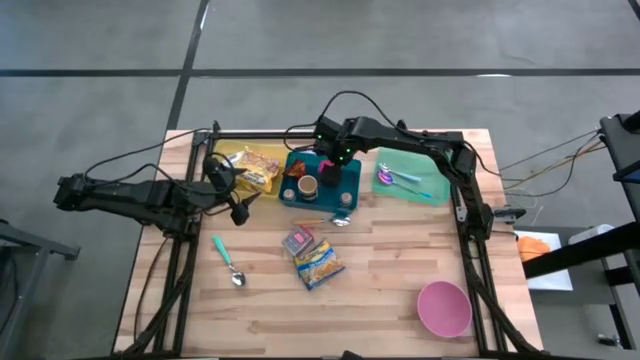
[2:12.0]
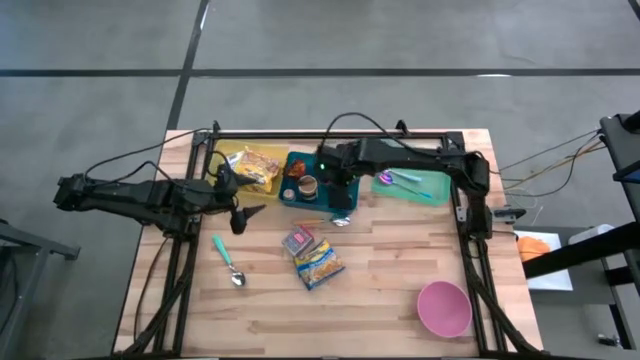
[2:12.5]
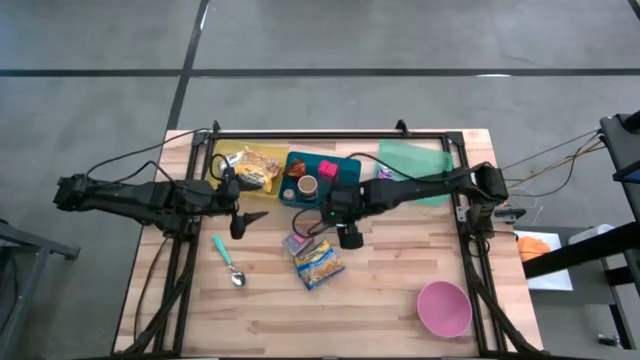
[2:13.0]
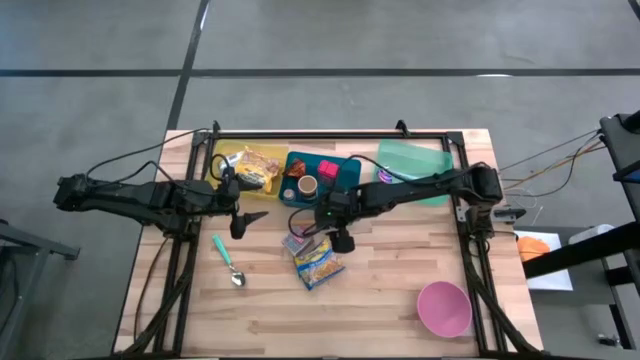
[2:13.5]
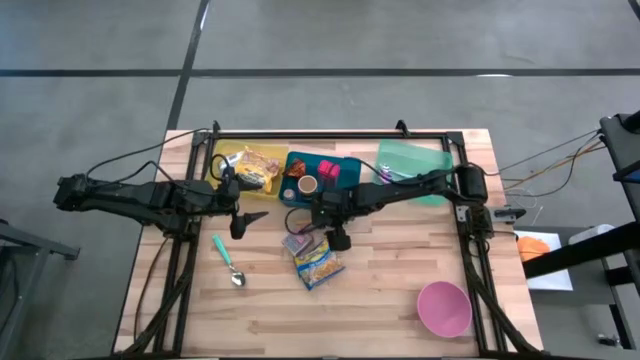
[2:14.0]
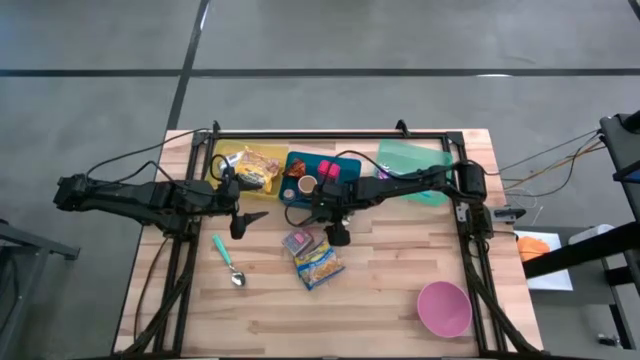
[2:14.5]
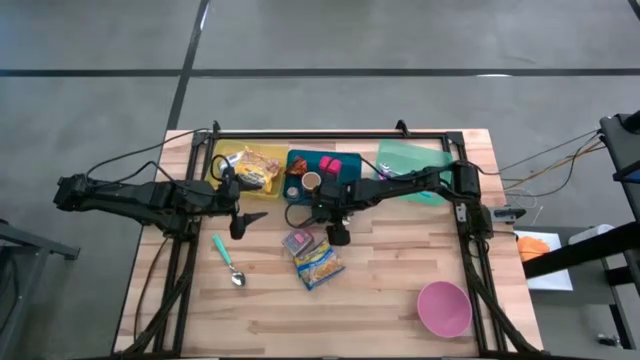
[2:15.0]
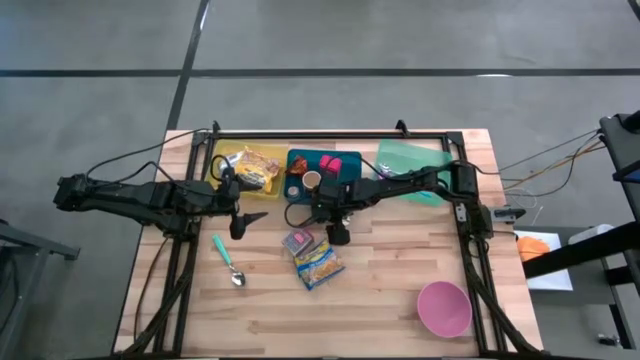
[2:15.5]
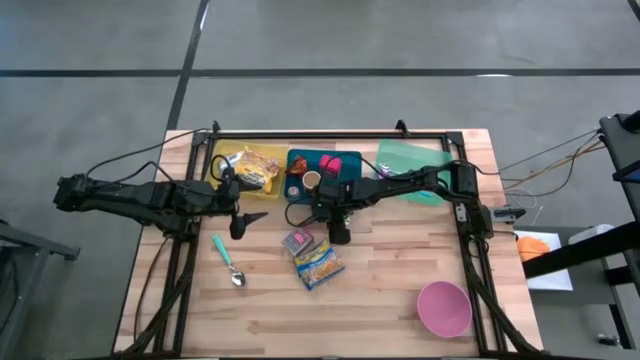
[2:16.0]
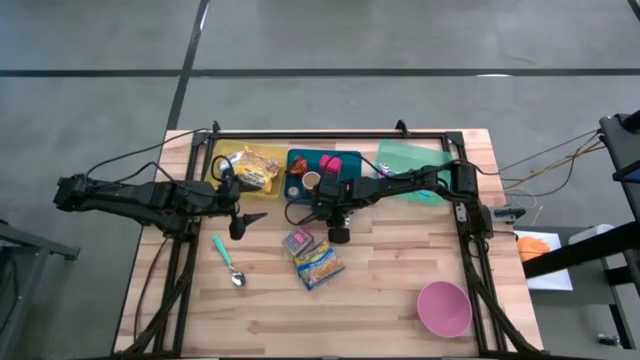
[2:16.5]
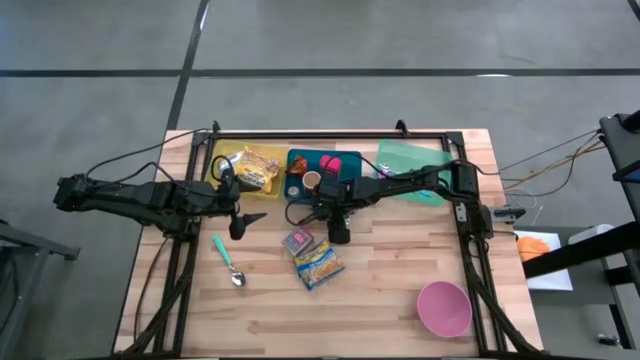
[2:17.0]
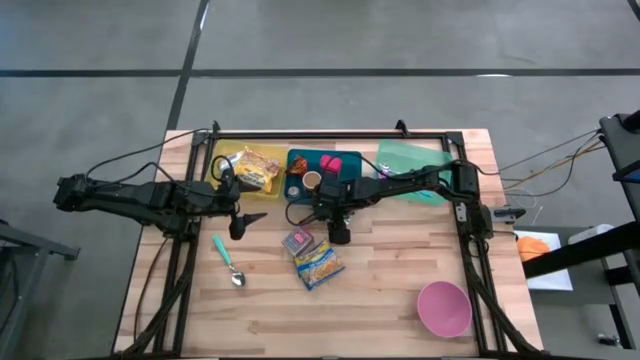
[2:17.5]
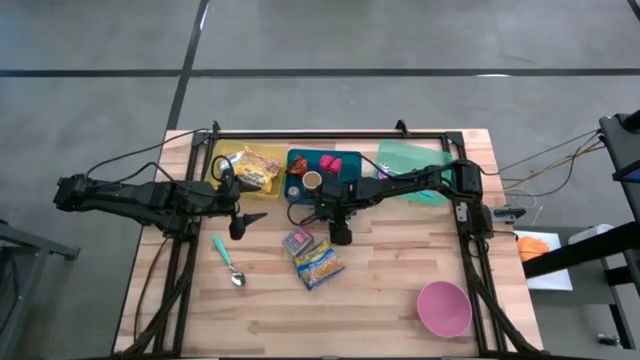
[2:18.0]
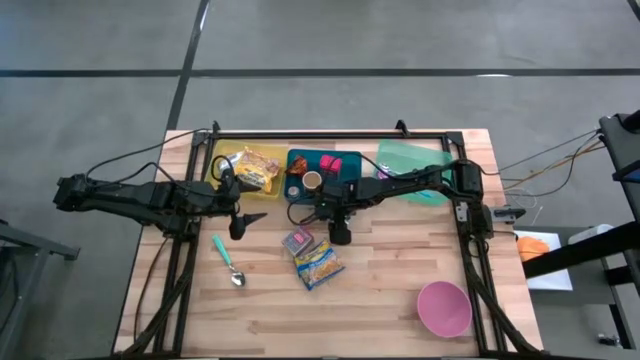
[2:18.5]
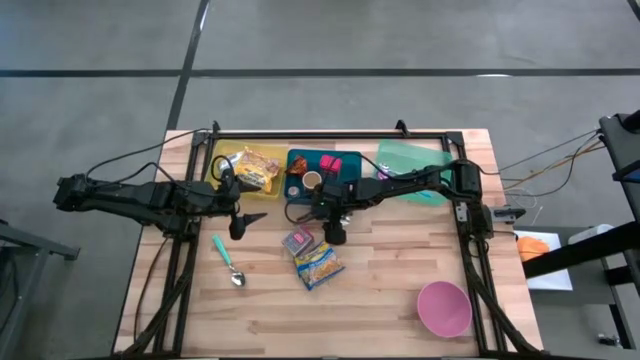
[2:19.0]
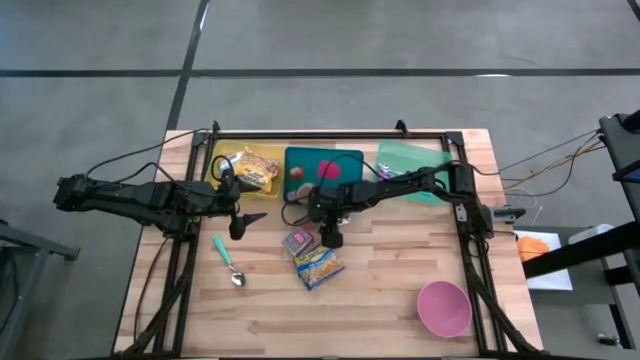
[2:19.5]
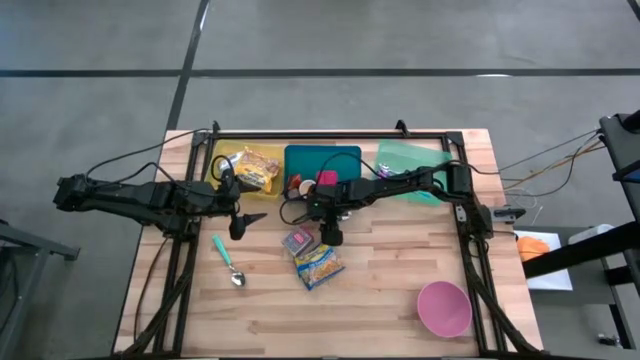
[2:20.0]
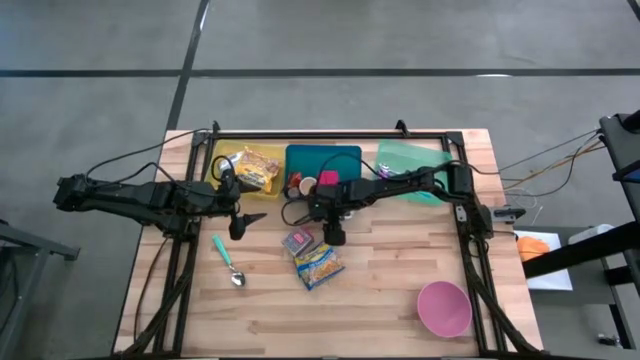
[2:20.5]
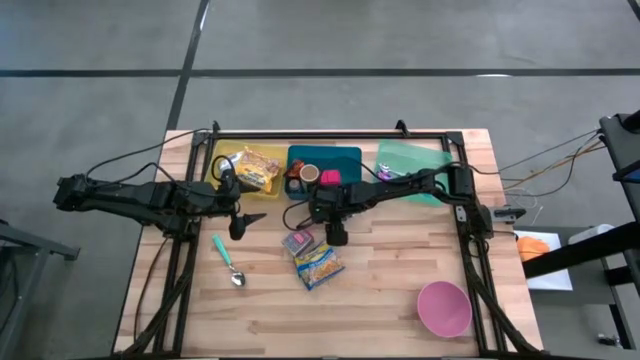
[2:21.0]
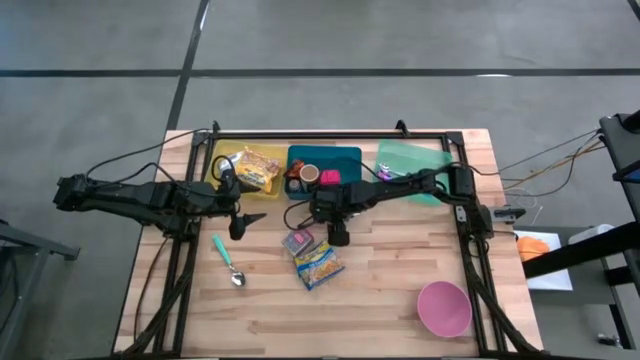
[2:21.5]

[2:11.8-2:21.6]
Put the orange spoon into the green bin

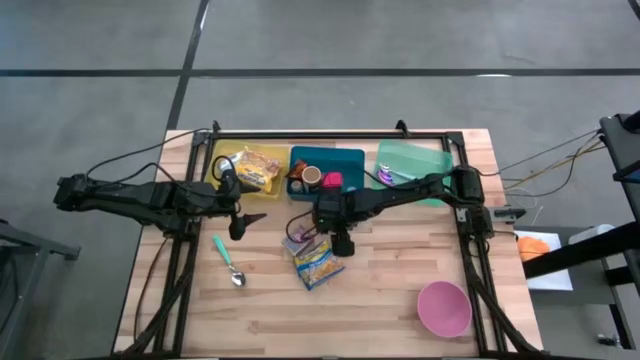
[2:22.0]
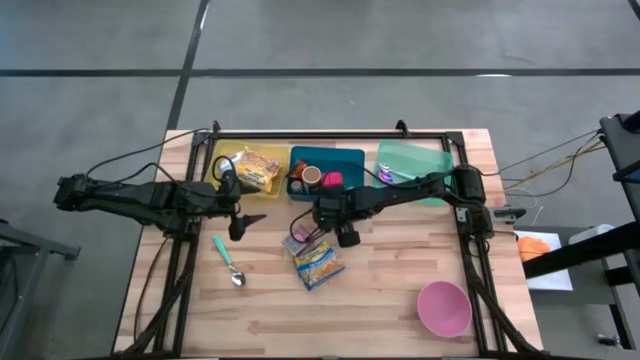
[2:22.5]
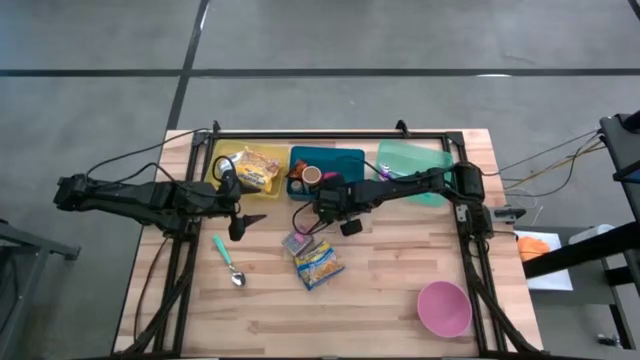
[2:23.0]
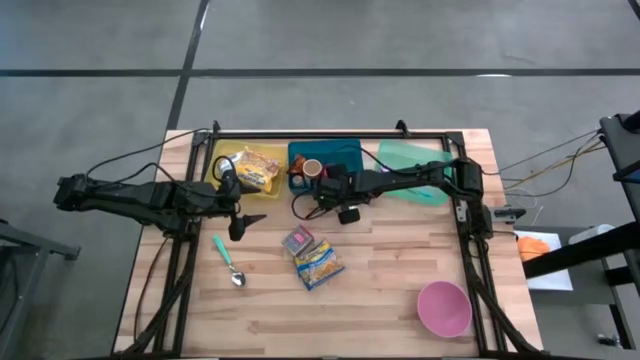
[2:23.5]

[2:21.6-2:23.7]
Adjust the blue bin

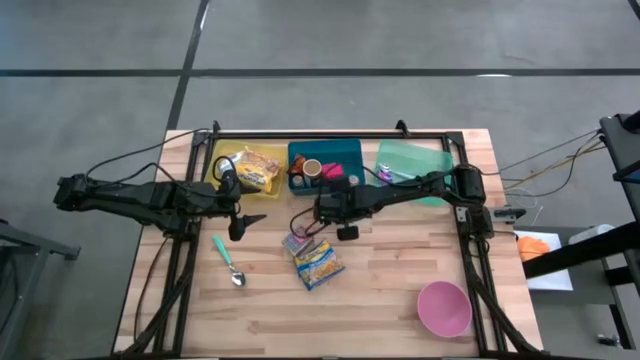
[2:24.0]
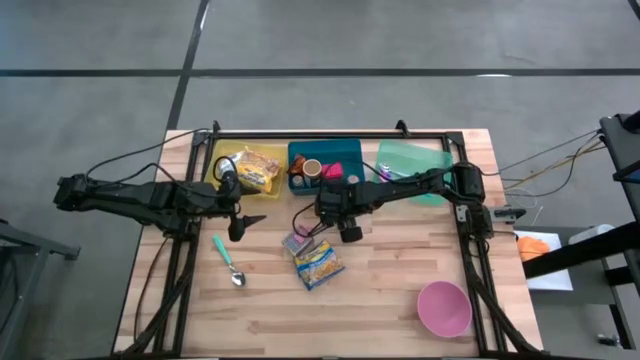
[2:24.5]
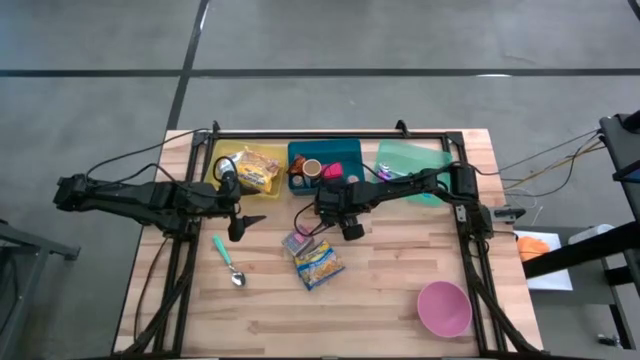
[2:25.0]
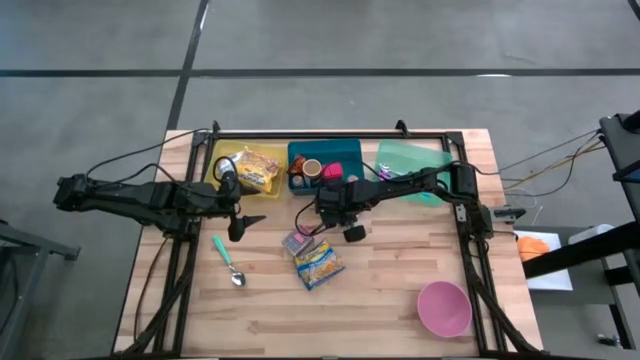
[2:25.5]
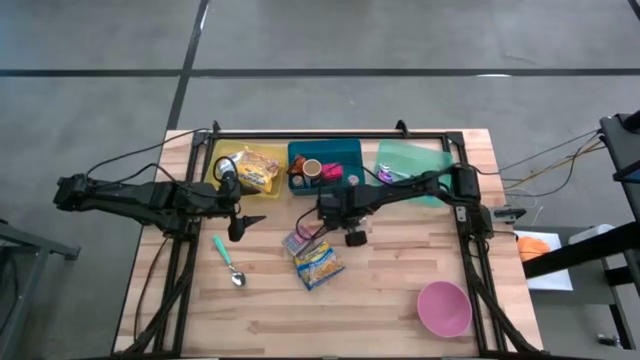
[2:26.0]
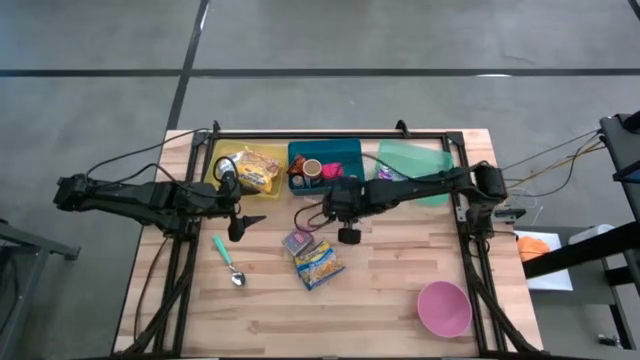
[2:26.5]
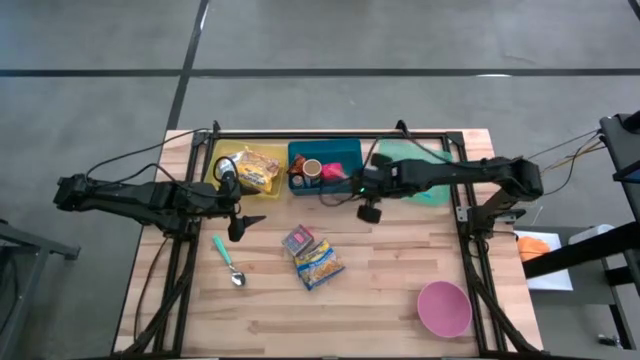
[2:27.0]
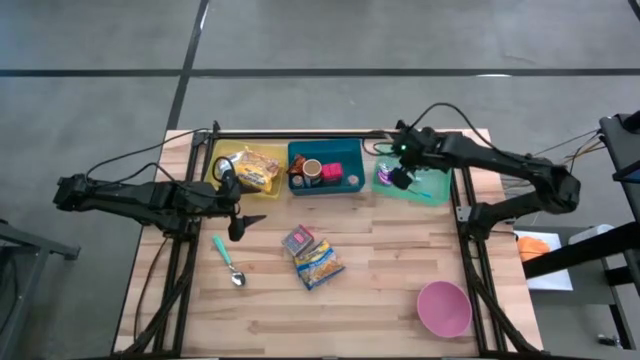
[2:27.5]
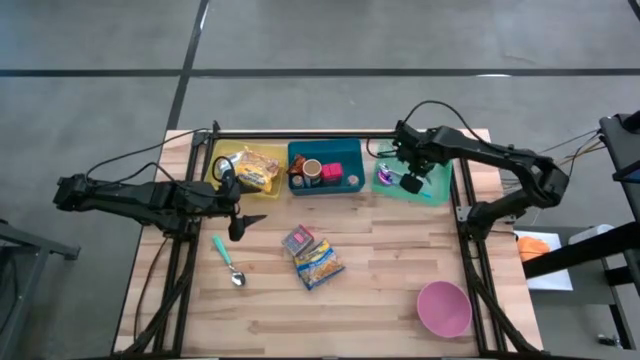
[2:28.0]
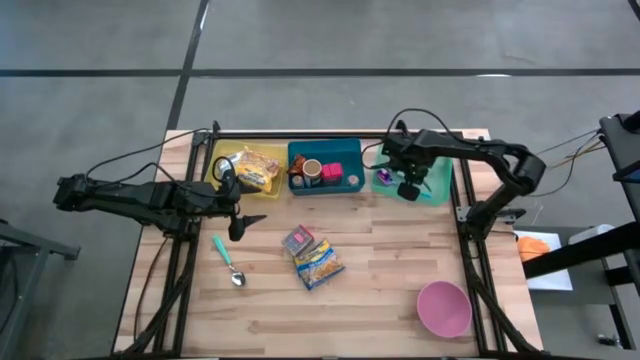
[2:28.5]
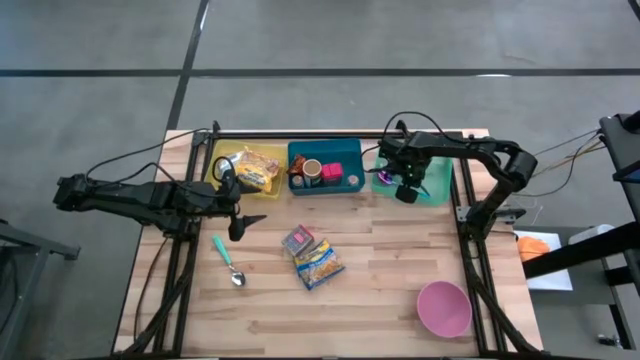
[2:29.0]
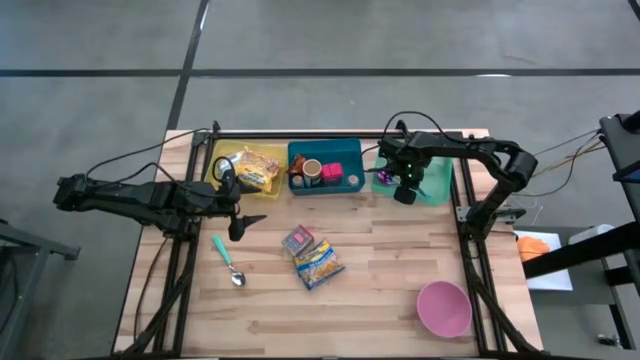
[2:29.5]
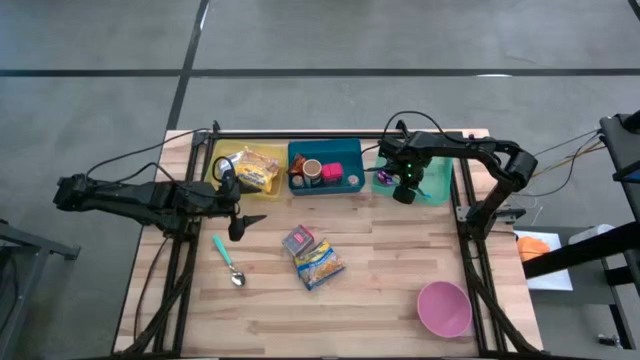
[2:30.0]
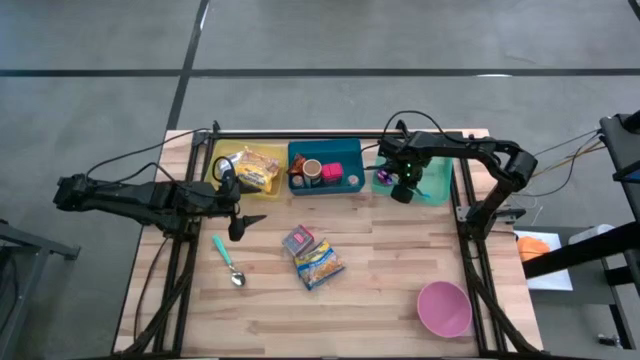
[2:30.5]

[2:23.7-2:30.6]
Put the orange spoon into the green bin

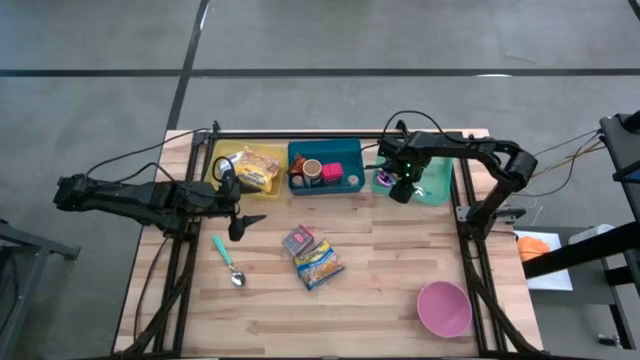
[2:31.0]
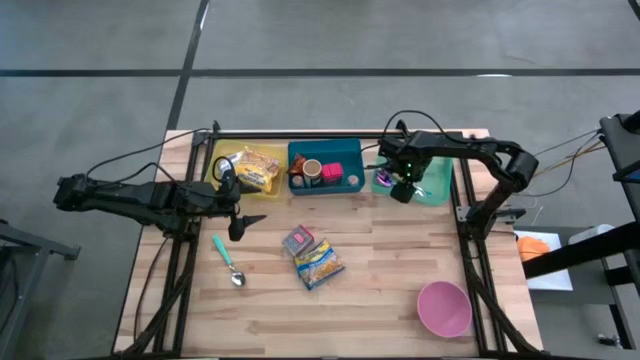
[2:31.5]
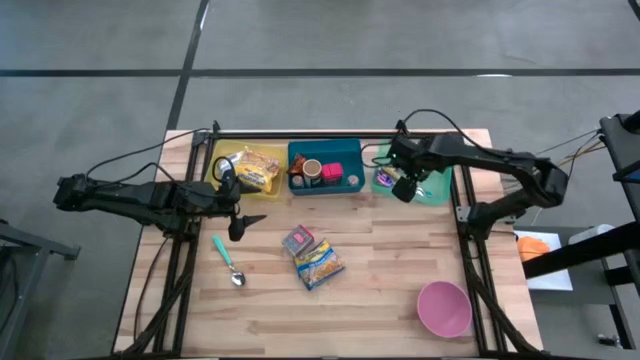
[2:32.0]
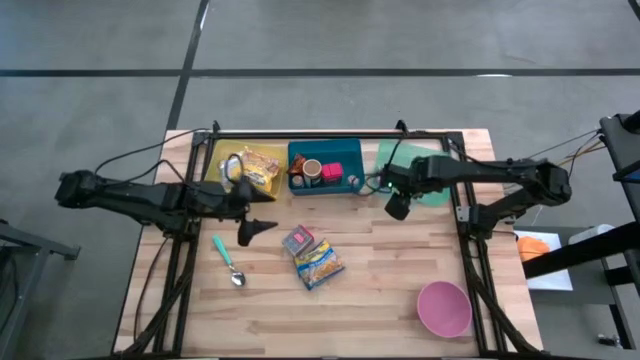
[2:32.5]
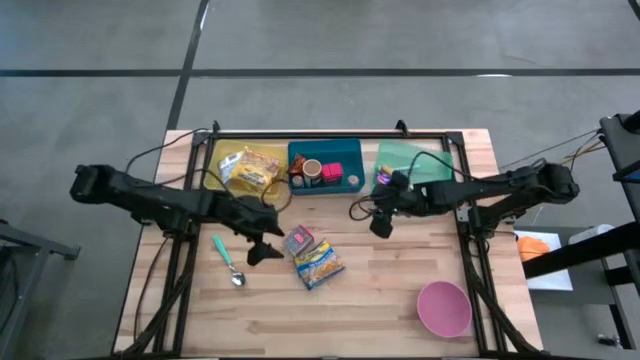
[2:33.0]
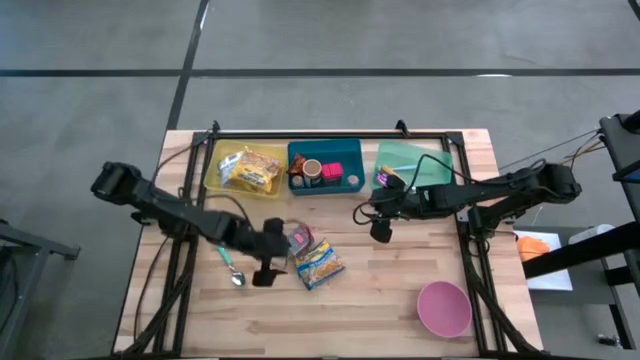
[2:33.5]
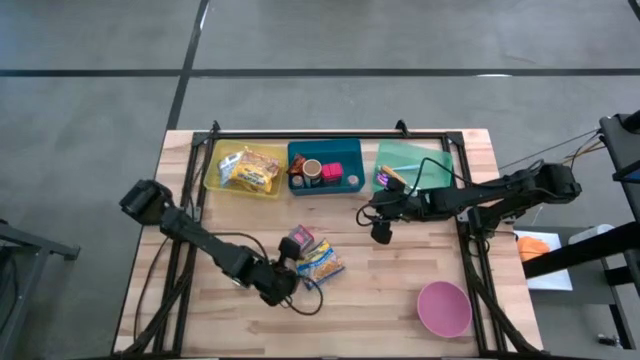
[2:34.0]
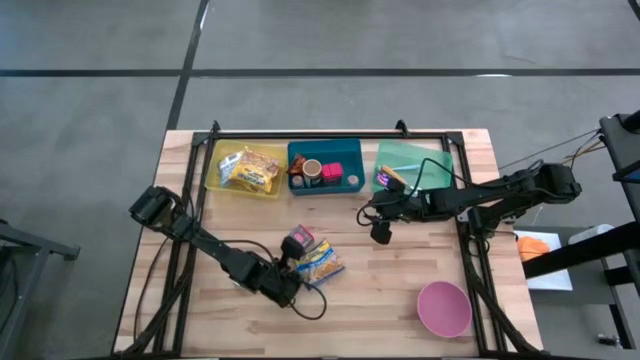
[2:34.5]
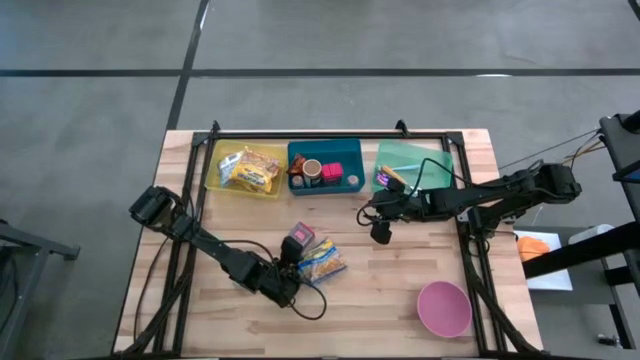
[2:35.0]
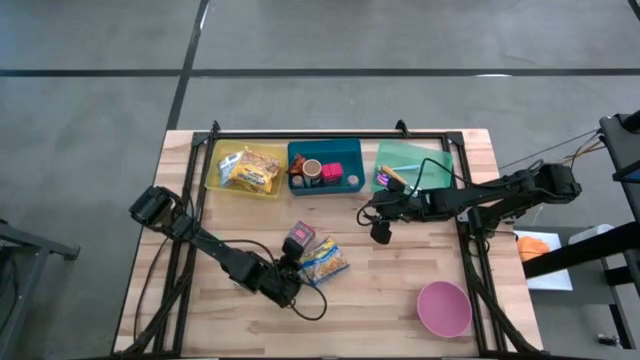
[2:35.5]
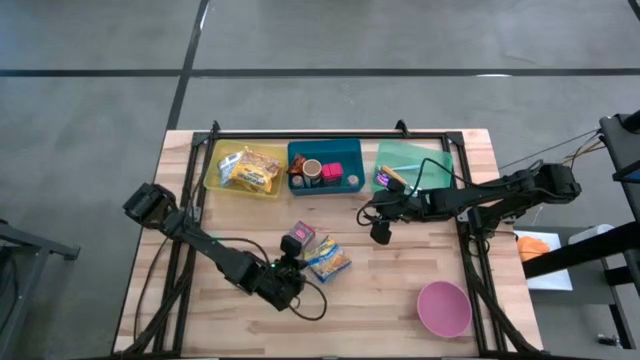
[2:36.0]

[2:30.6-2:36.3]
Put the blue noodle pack into the yellow bin
